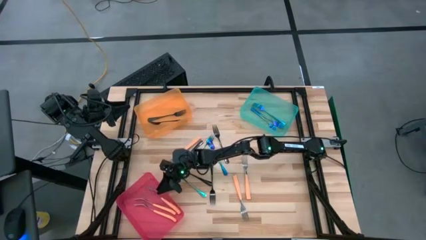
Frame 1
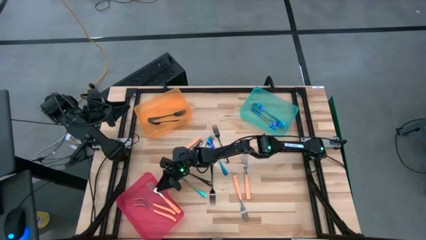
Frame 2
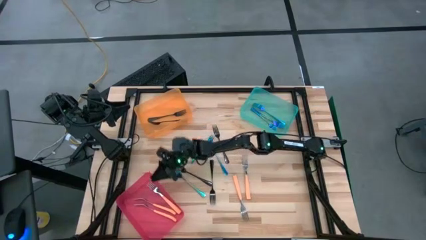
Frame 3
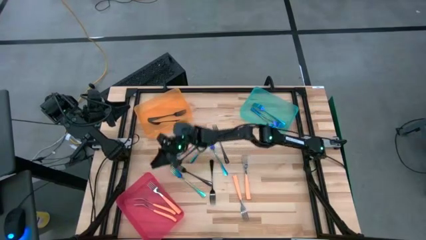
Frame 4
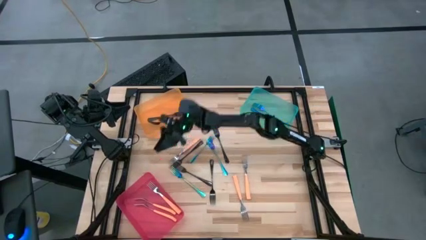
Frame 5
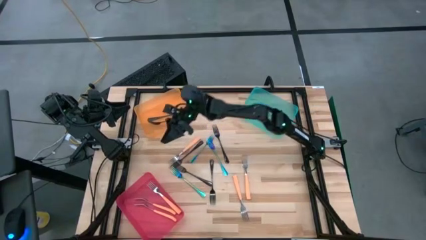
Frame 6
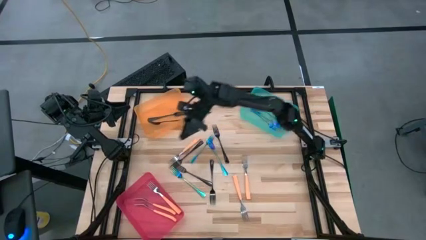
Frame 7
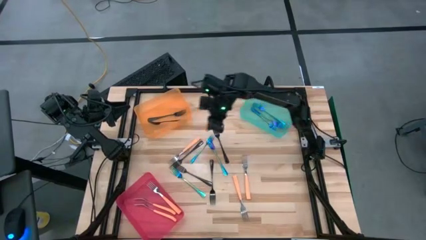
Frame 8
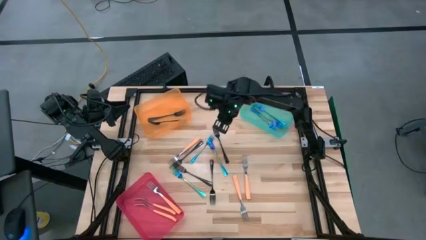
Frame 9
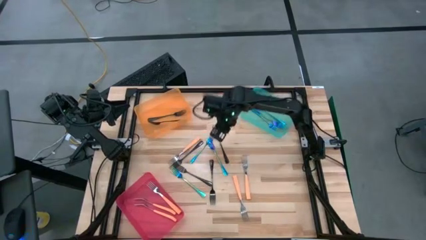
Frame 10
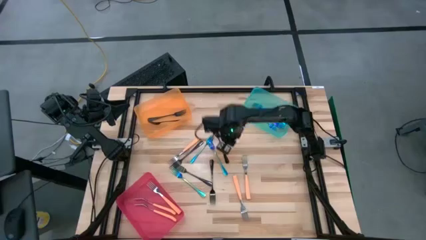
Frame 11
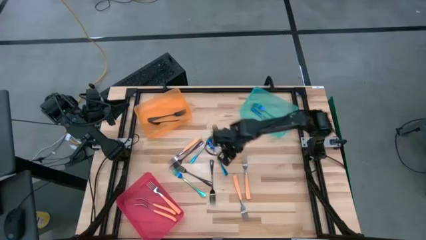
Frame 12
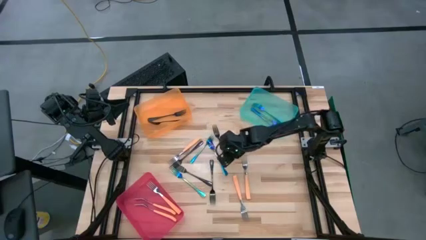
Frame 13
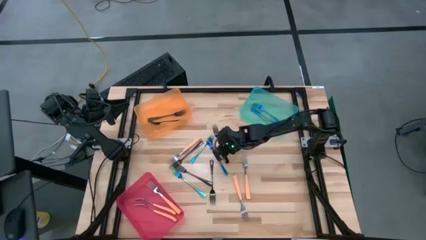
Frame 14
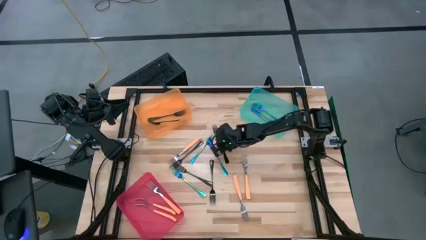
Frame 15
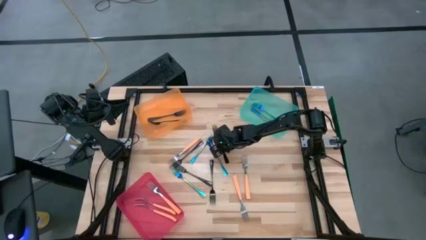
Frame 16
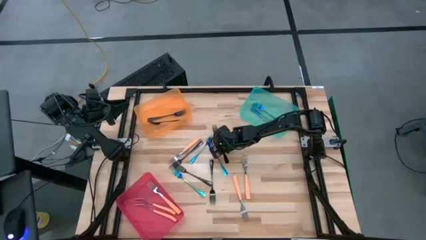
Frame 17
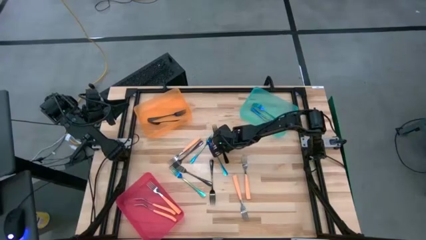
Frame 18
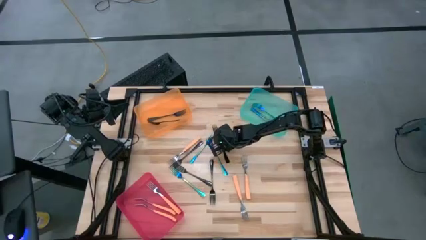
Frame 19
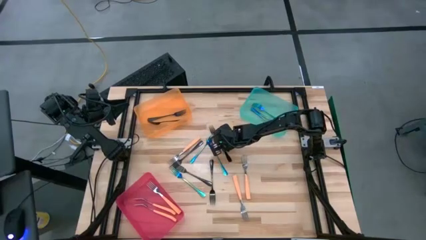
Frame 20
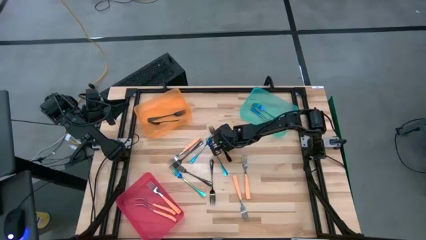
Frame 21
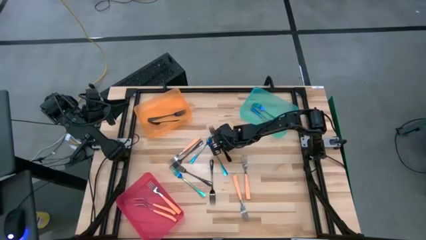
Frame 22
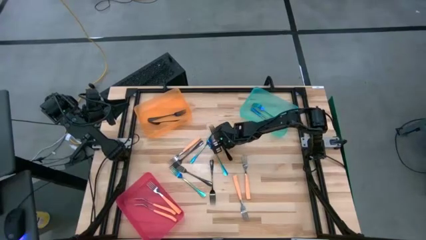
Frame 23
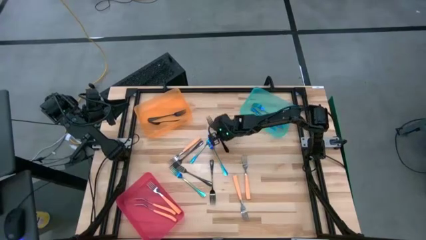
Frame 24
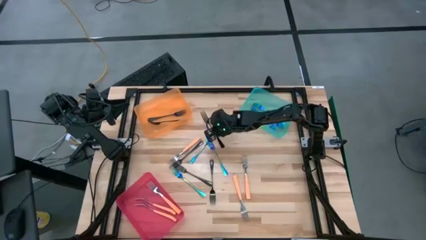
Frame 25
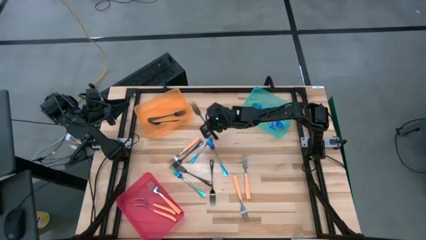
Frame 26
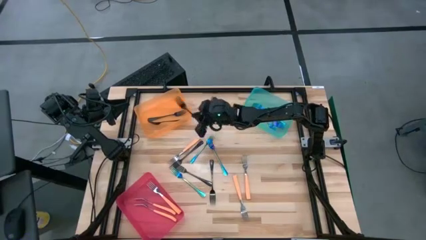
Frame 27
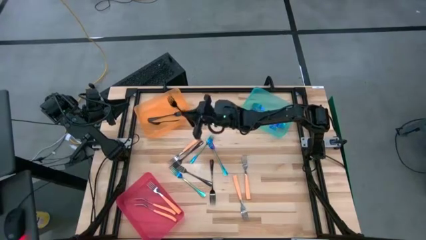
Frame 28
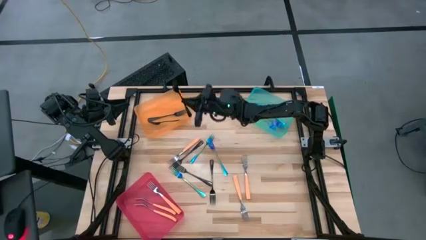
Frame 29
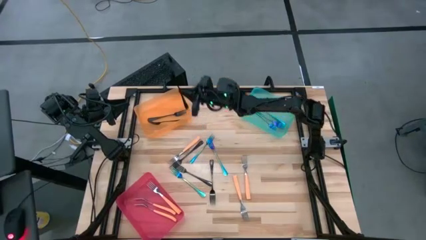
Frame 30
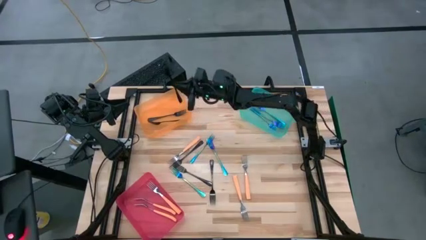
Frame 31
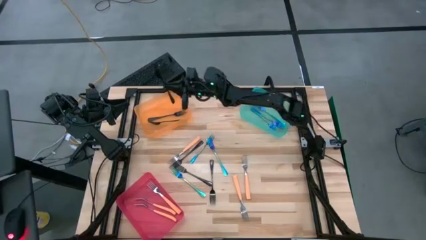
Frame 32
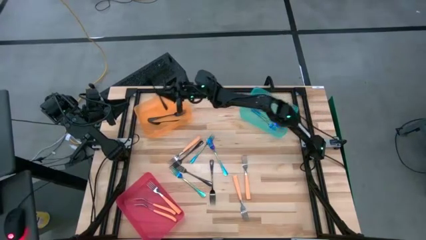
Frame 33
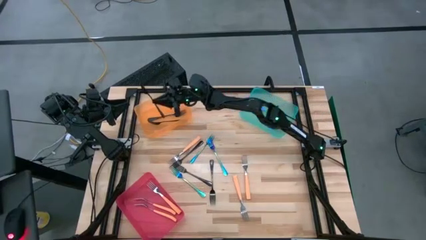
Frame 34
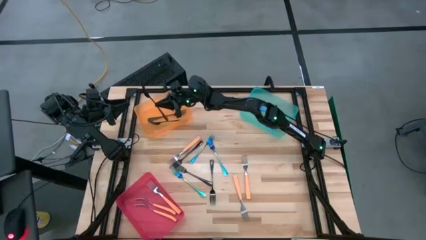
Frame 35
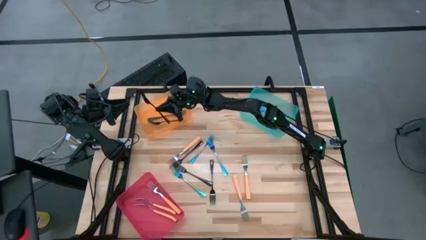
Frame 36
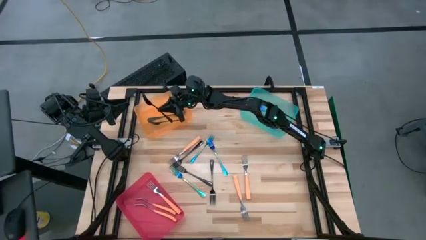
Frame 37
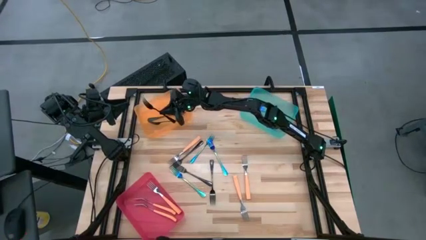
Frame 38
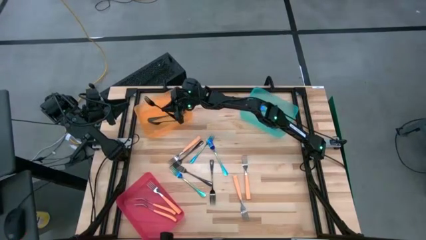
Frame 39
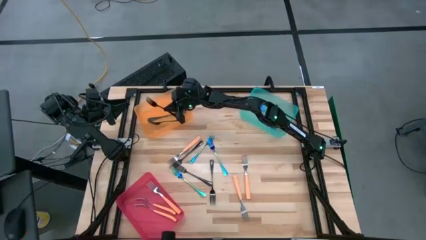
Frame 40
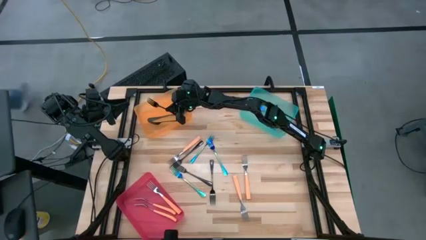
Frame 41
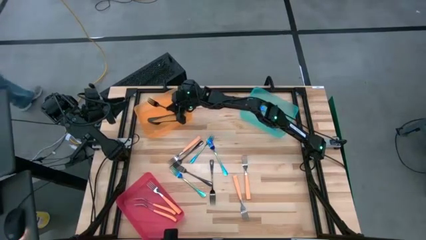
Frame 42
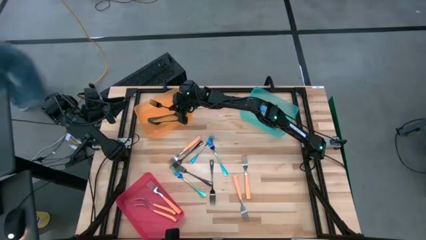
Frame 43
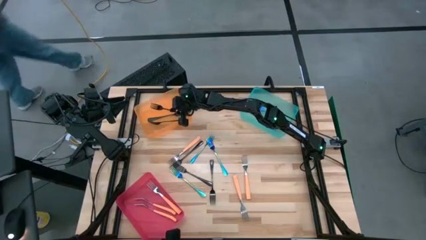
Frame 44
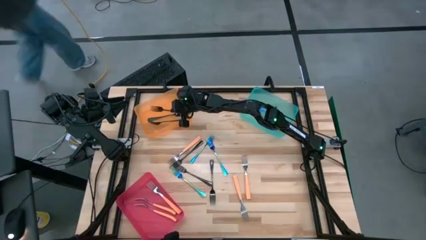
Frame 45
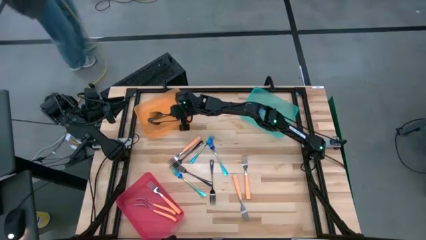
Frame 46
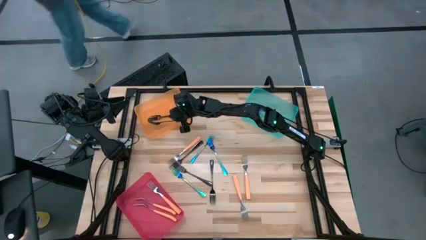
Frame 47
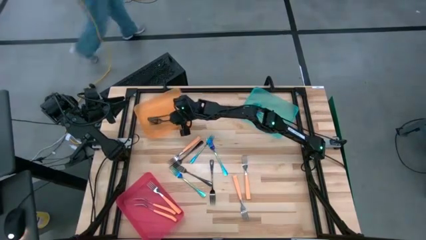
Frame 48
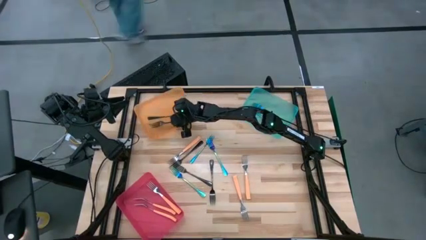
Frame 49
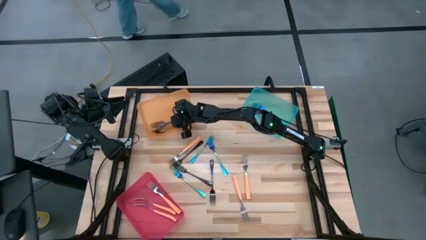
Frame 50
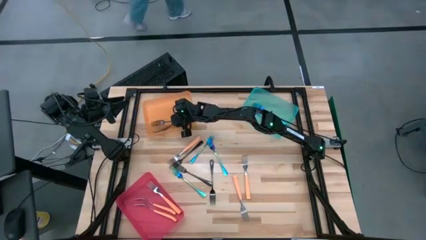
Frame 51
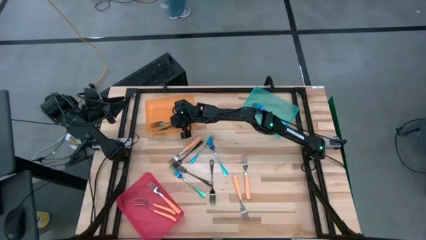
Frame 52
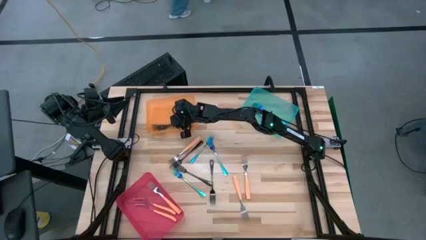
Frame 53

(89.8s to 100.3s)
Task: Sort silverware by color (type)
Put the black fork into the orange bin

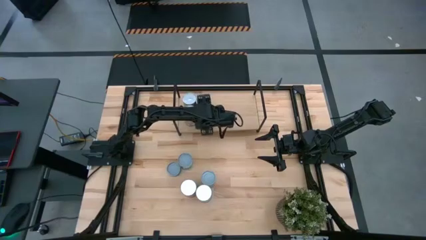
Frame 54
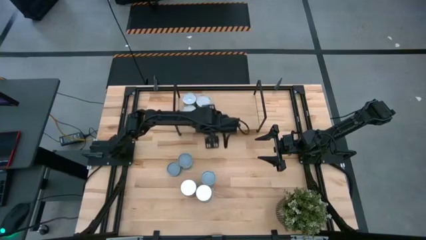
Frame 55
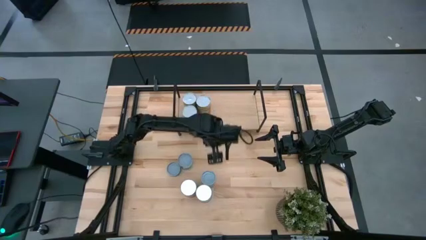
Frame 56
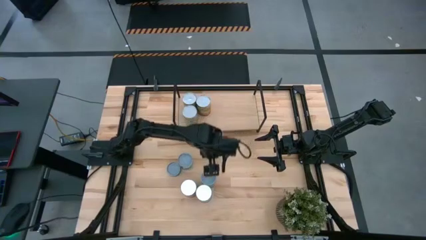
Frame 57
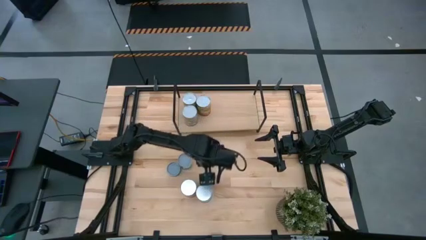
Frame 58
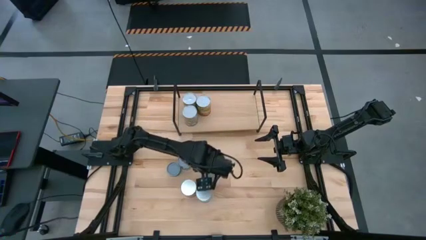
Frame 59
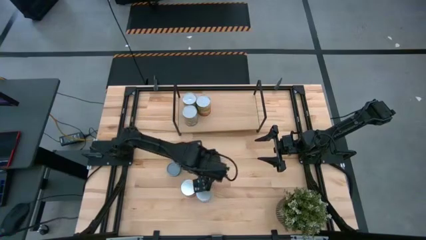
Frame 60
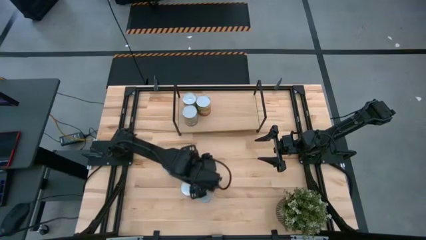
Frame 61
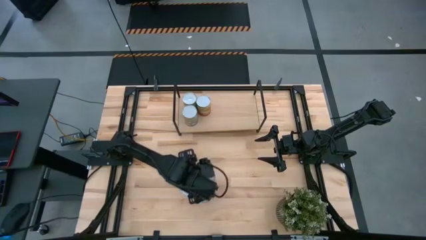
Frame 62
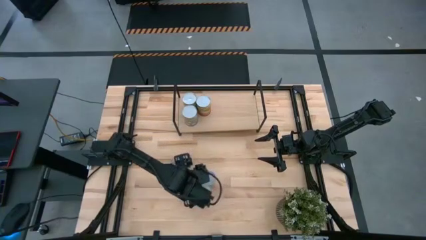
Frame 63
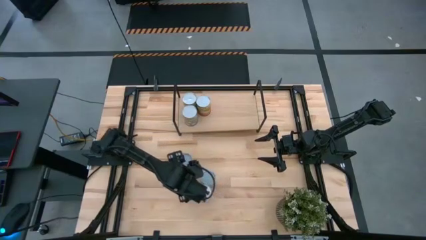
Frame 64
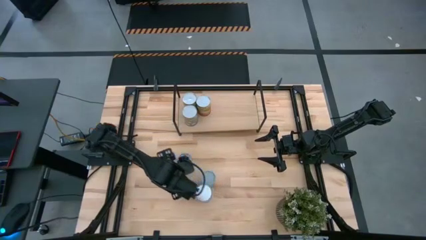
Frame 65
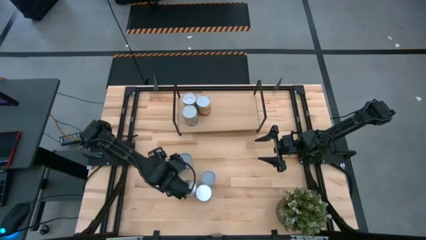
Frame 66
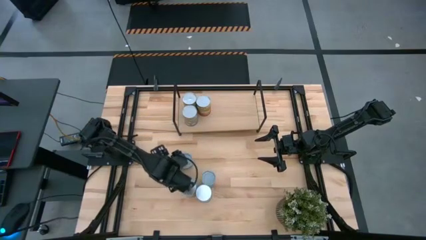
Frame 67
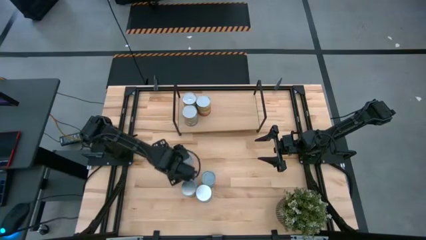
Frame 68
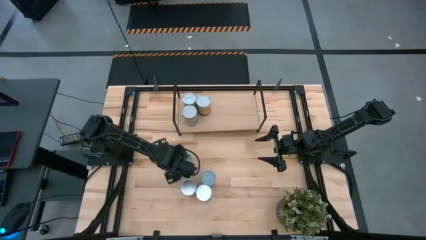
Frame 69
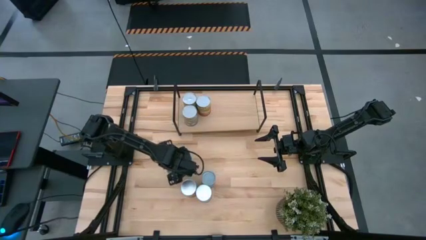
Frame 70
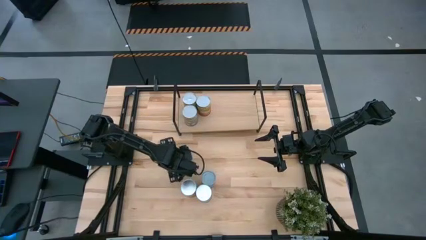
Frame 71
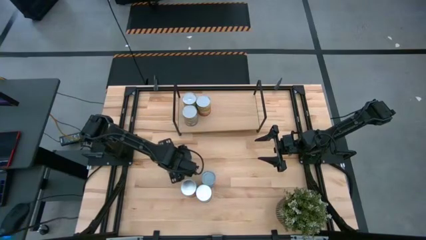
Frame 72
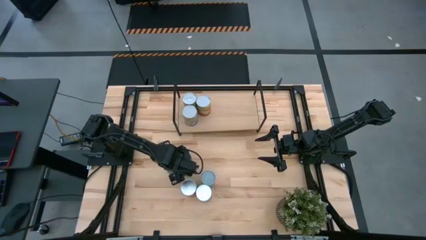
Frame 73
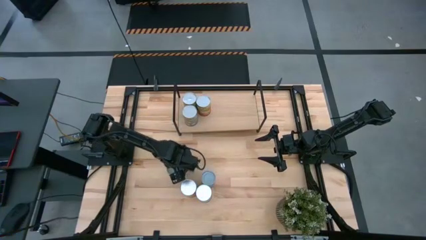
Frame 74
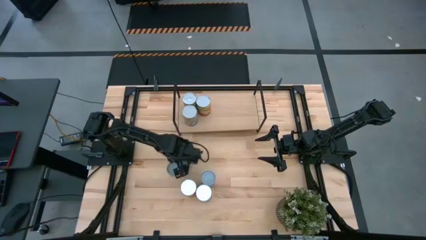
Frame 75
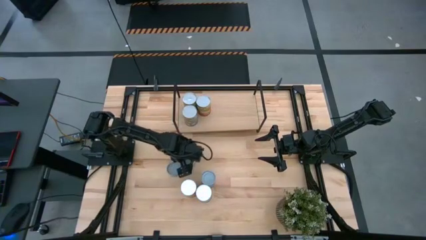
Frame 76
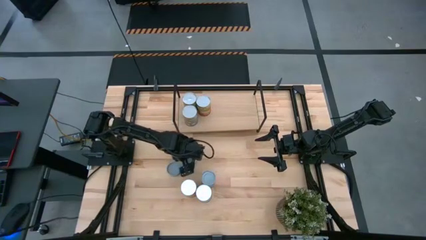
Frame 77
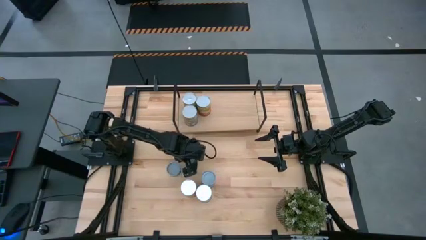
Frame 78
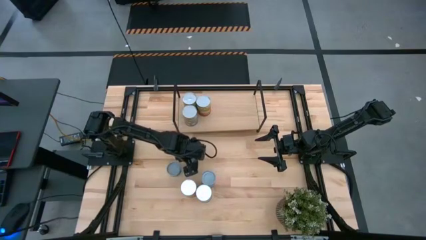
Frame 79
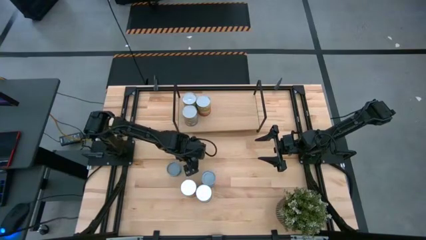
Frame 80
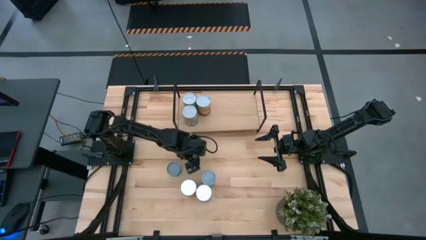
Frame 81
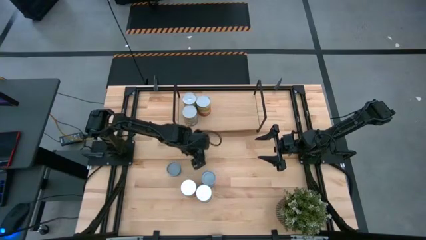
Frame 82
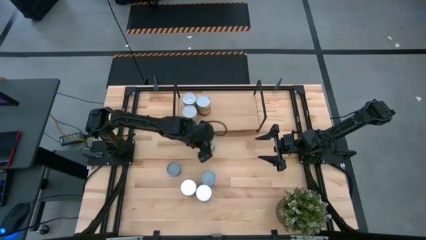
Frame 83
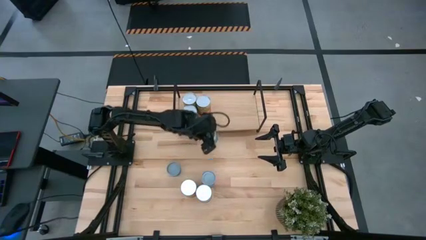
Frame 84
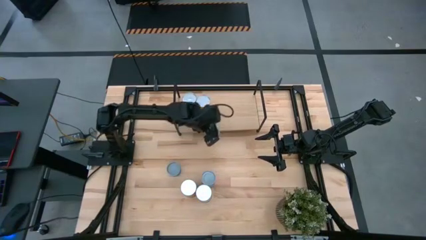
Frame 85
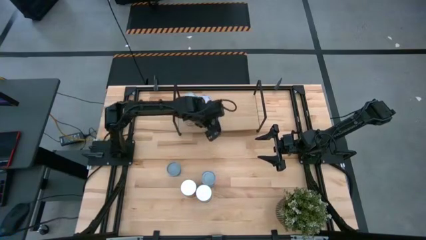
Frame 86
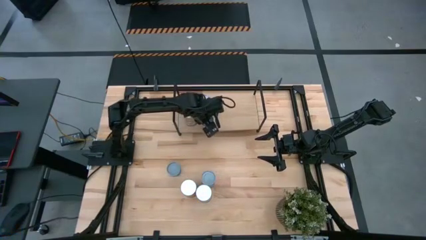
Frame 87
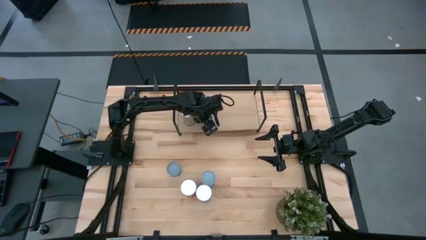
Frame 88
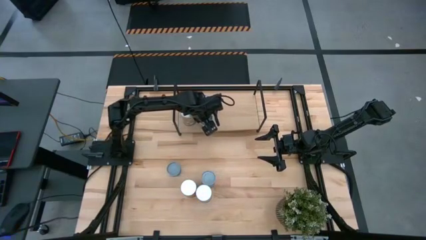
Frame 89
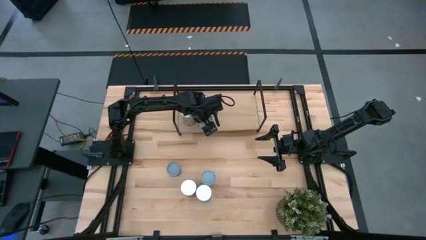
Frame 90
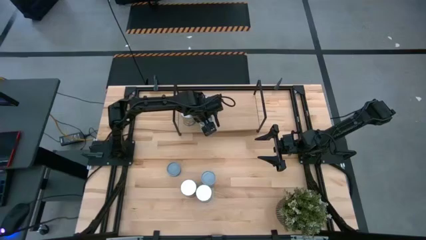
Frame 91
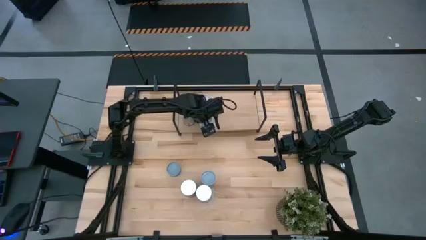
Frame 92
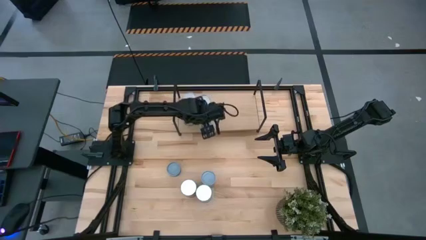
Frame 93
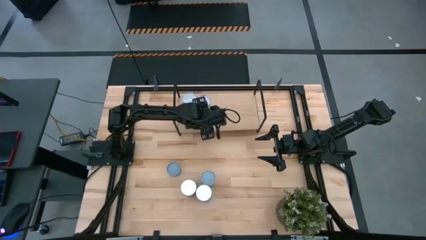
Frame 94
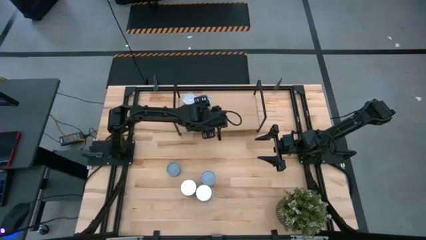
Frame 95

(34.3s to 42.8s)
Task: Pick and place cans onto a shelf
Put the canned mixed vegetables on the shelf
